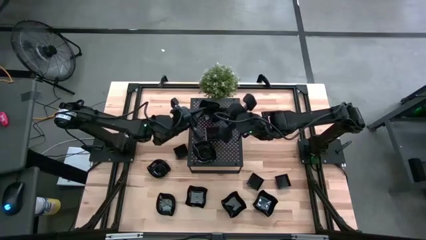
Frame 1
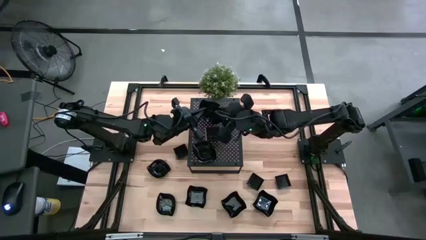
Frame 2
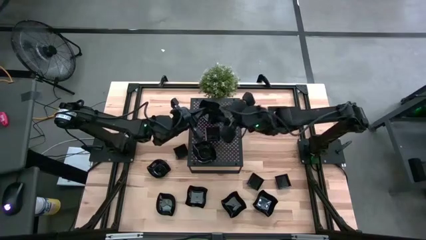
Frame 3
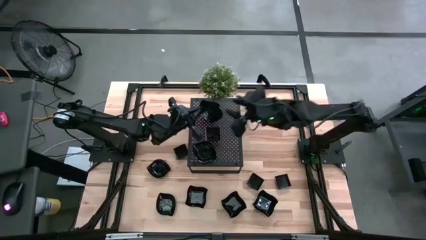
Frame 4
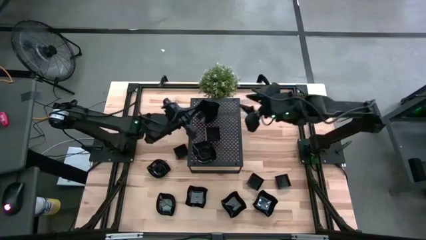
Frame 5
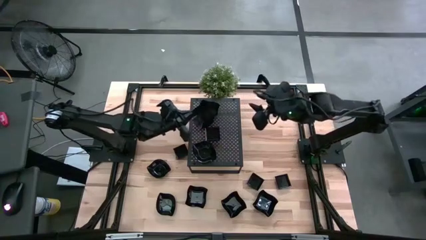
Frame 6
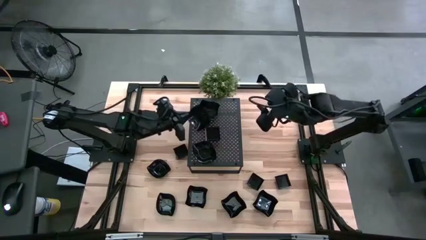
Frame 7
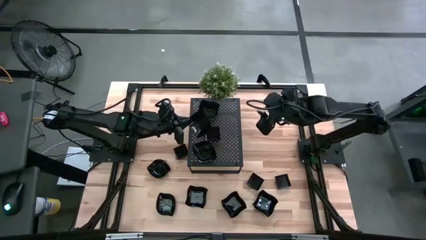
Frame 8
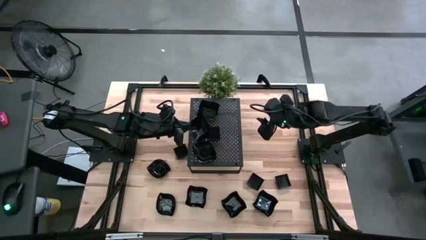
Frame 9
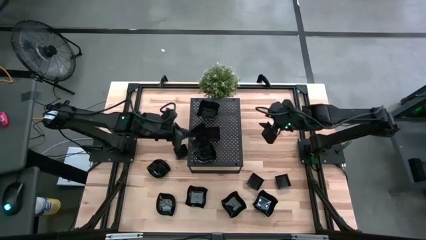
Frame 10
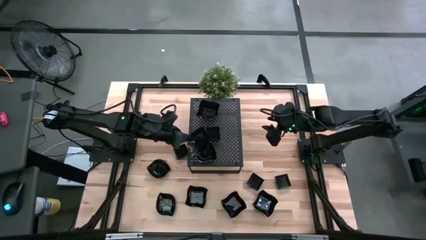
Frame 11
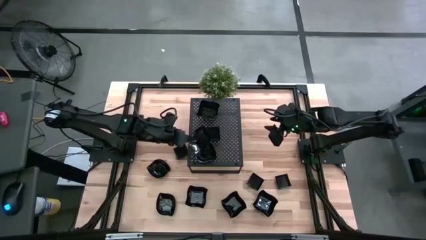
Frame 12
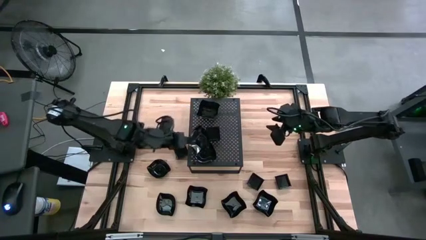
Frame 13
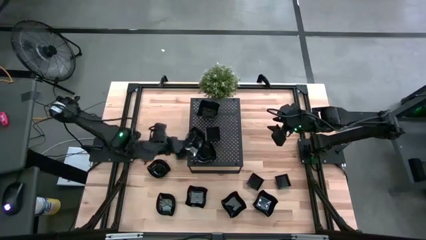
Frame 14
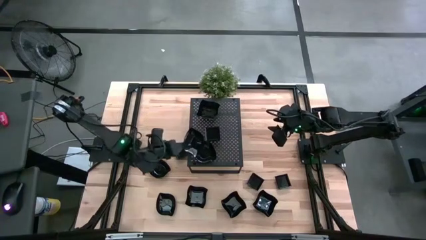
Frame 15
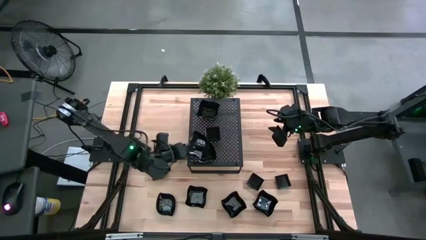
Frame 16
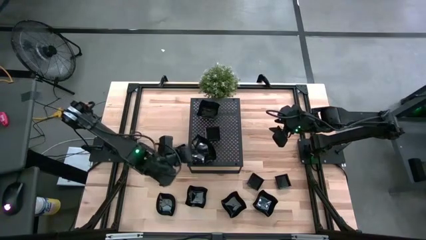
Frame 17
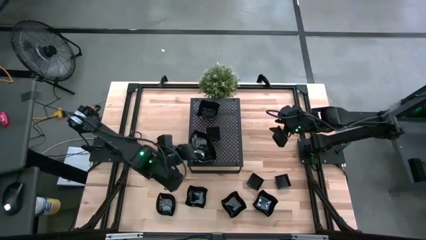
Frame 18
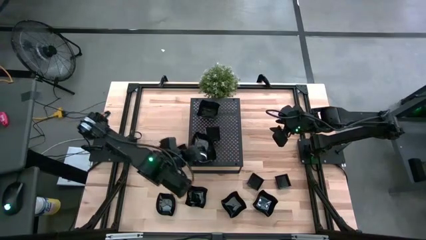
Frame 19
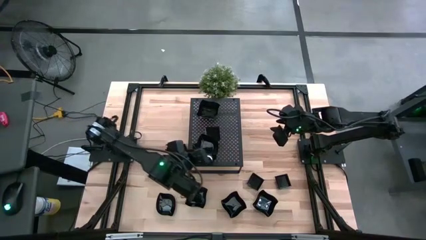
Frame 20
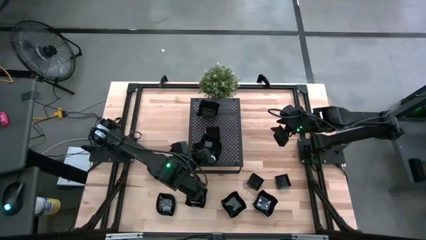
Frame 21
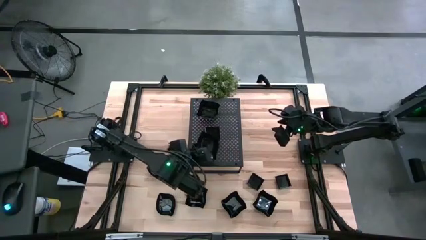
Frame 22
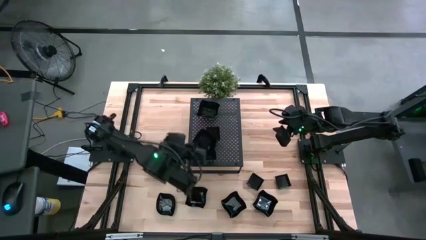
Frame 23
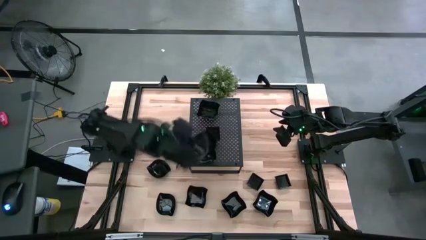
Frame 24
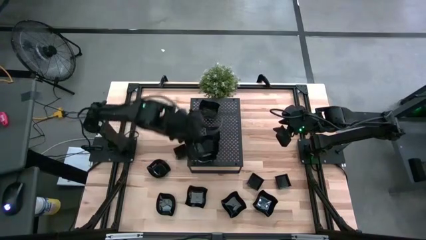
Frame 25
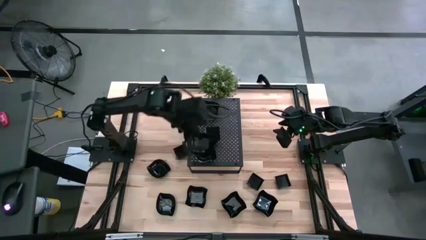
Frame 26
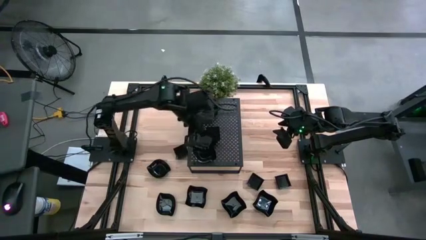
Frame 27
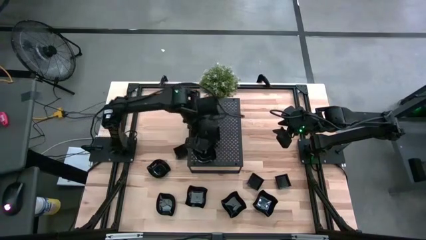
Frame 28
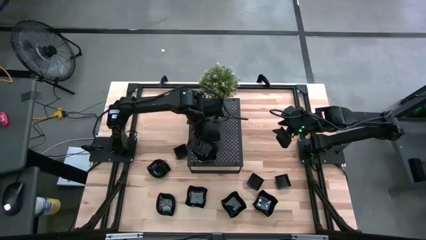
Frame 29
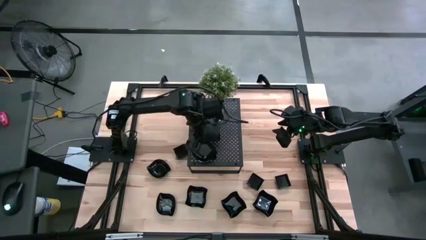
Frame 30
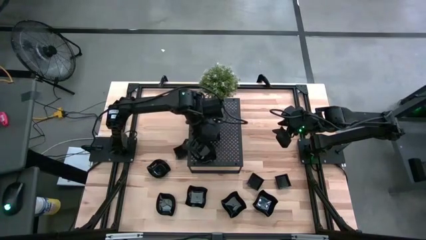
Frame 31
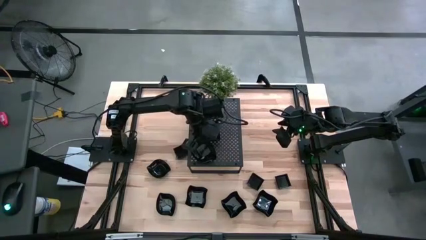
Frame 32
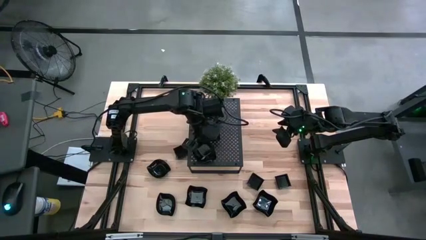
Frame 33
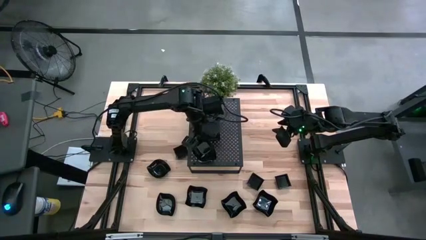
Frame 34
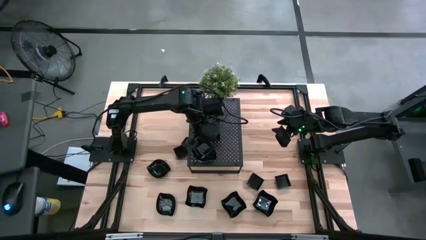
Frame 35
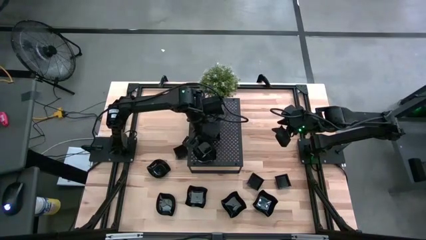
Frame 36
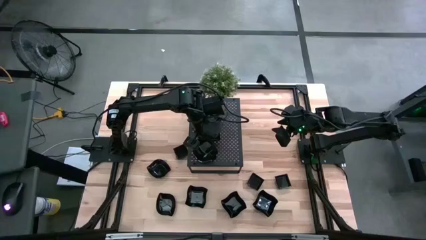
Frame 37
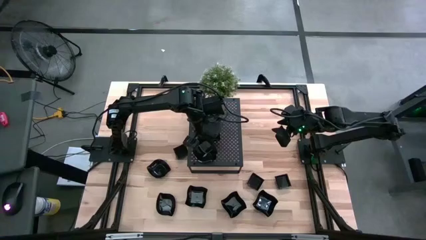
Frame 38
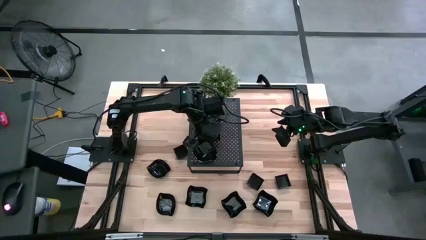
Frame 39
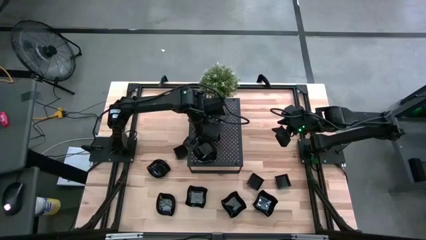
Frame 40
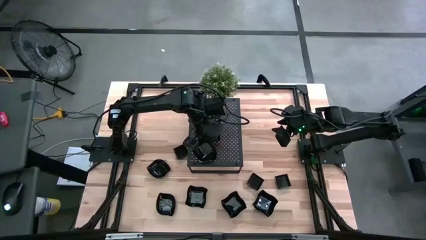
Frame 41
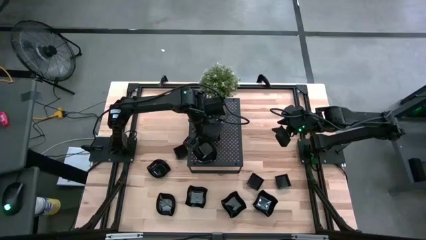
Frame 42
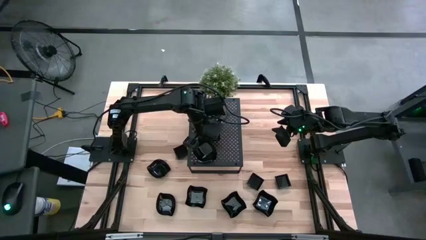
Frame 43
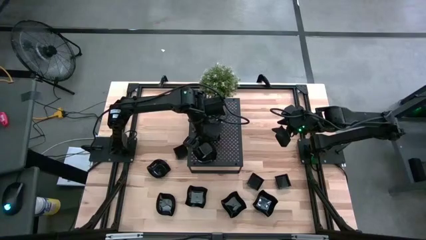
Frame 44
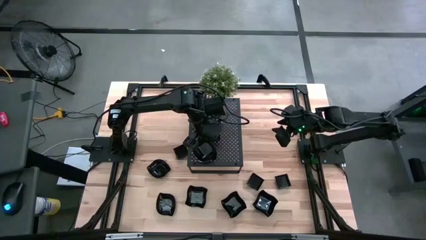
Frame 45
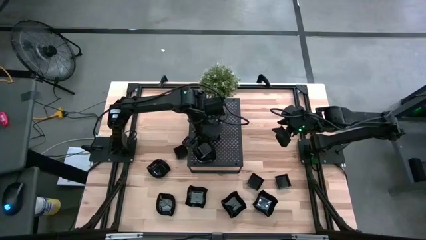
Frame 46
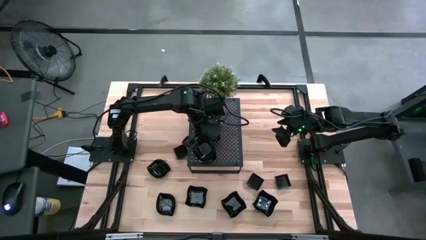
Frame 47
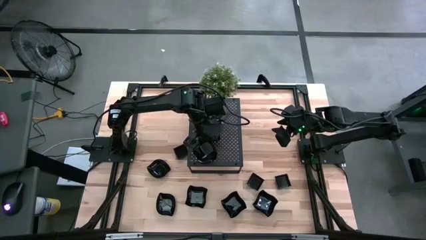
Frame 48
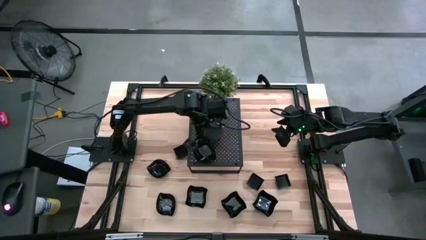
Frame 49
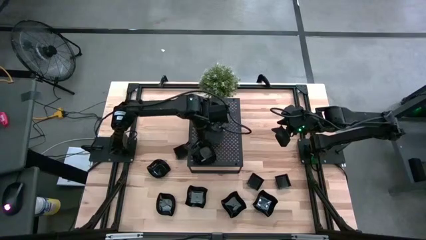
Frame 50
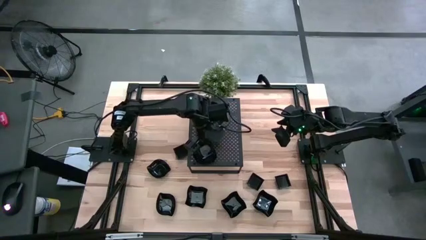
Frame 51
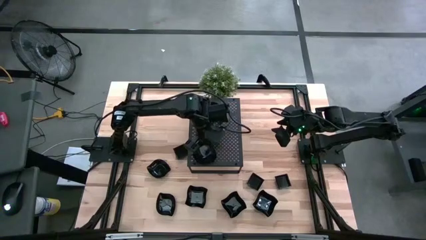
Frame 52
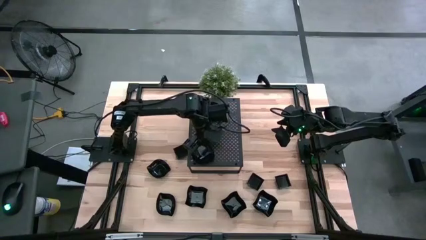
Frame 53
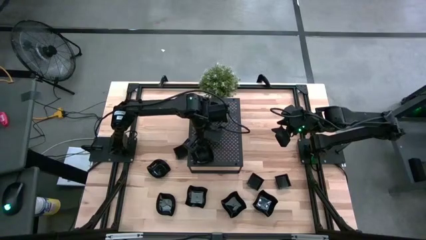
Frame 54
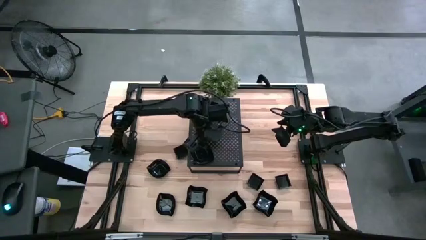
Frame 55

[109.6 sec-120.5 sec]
Task: Pick & Place Mini shaped plates
Stack the leaf-shaped plate on top of the leaf-shaped plates on the shelf
